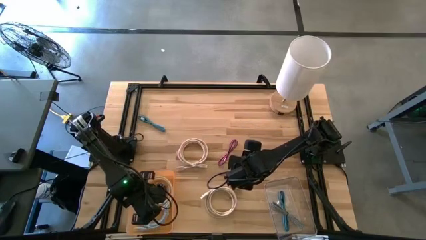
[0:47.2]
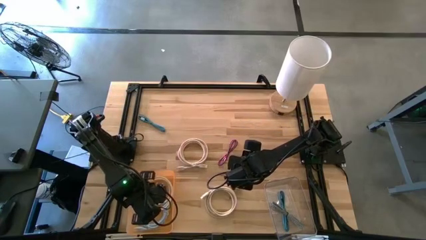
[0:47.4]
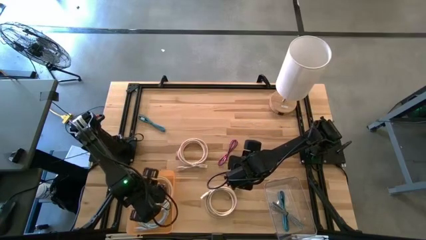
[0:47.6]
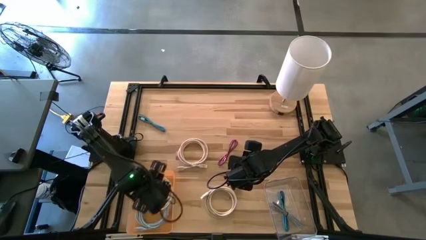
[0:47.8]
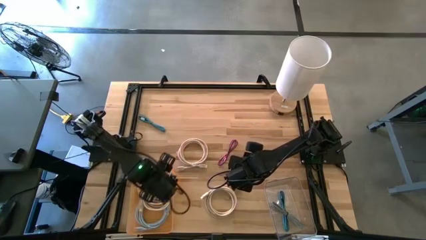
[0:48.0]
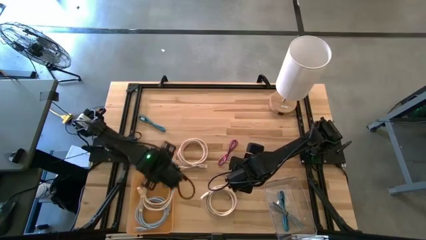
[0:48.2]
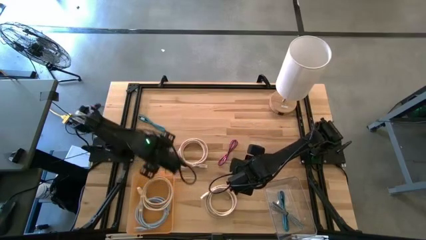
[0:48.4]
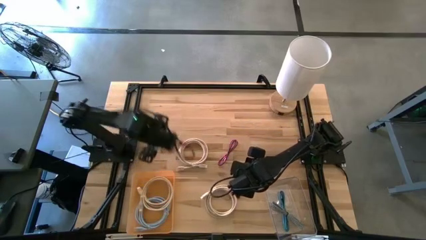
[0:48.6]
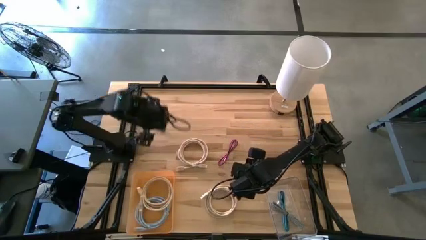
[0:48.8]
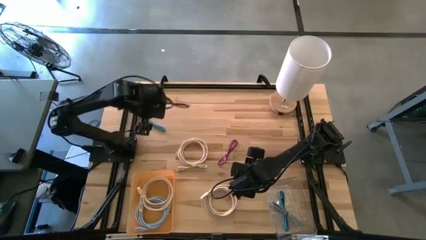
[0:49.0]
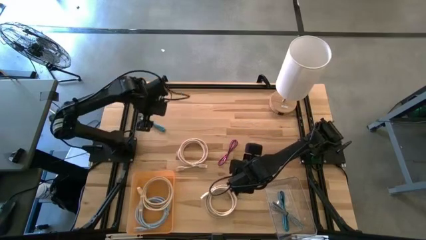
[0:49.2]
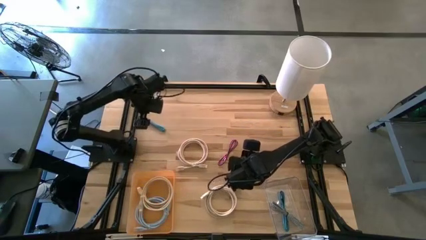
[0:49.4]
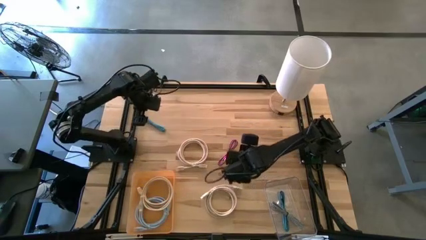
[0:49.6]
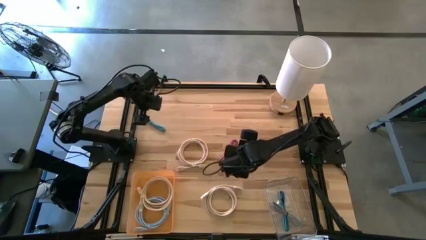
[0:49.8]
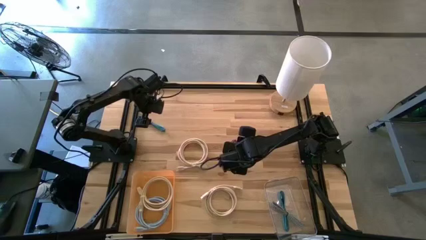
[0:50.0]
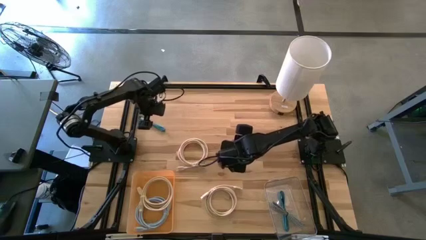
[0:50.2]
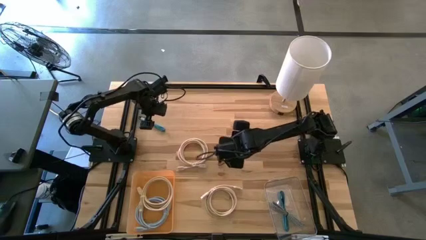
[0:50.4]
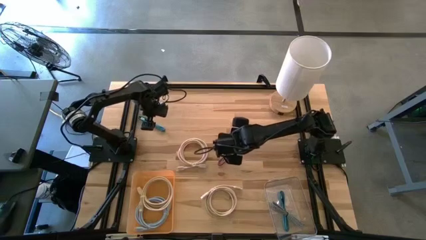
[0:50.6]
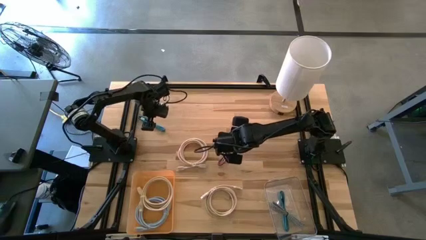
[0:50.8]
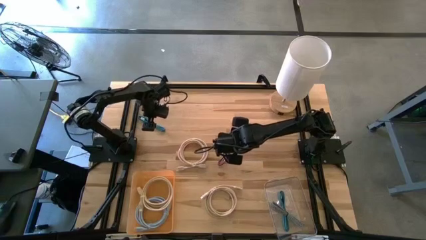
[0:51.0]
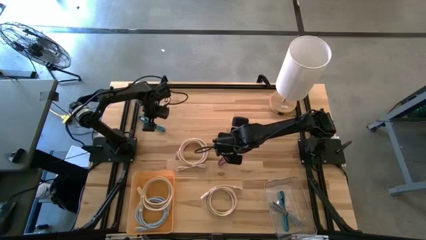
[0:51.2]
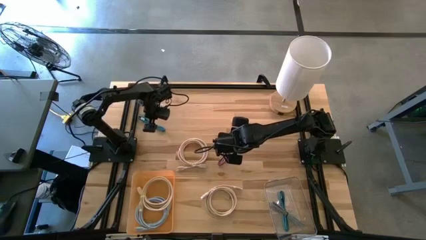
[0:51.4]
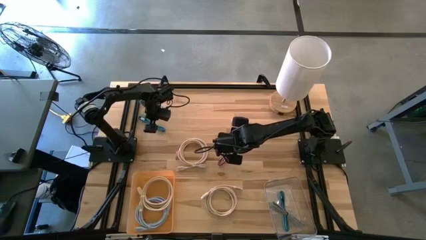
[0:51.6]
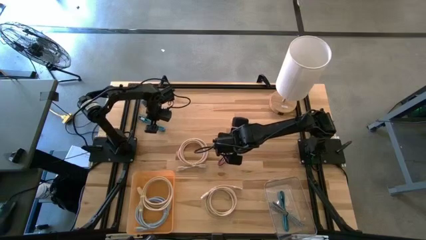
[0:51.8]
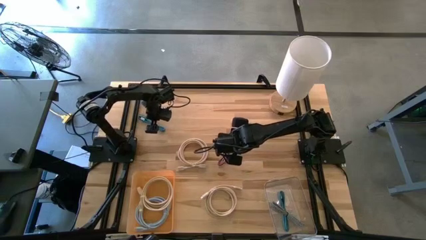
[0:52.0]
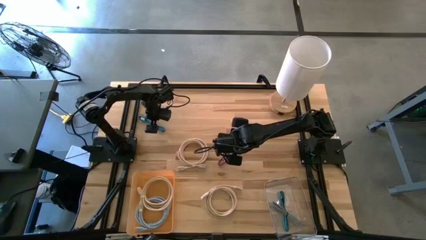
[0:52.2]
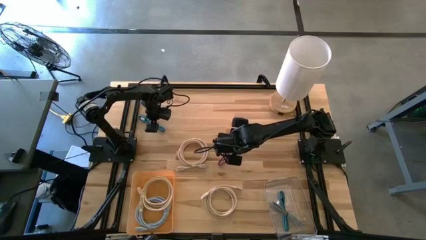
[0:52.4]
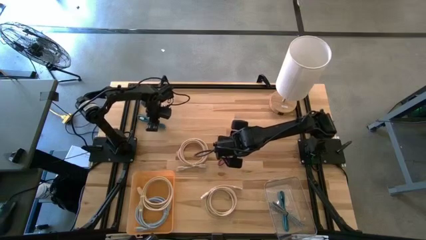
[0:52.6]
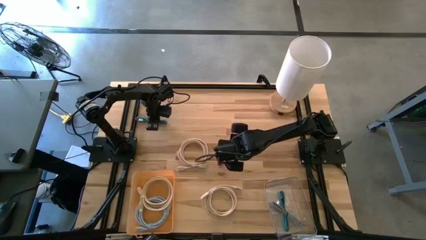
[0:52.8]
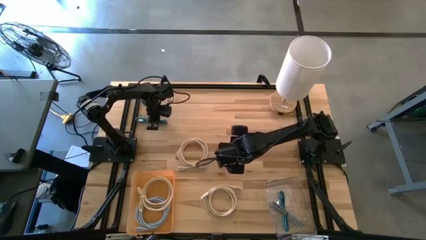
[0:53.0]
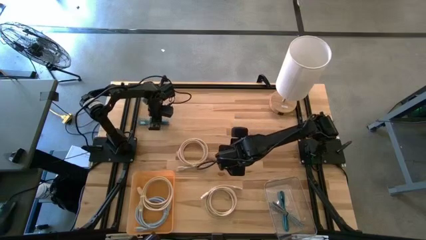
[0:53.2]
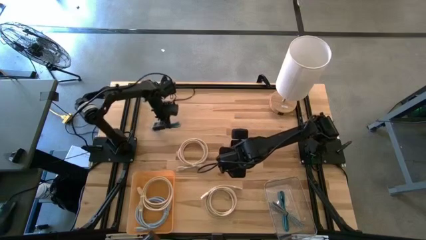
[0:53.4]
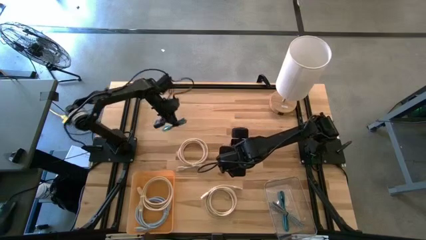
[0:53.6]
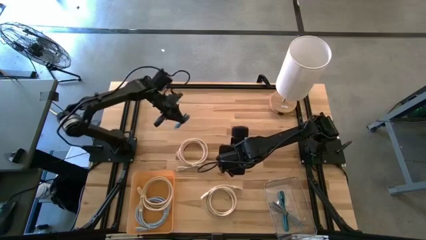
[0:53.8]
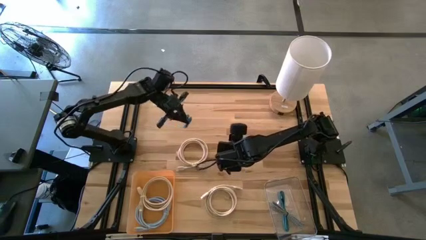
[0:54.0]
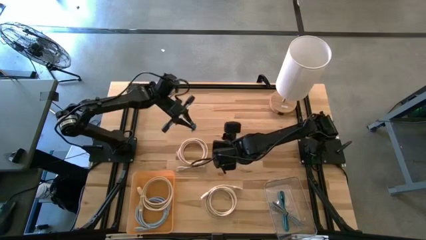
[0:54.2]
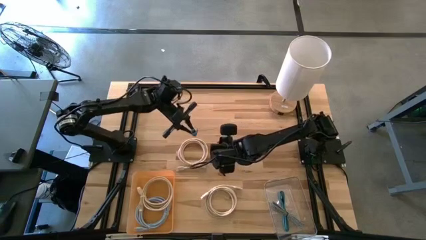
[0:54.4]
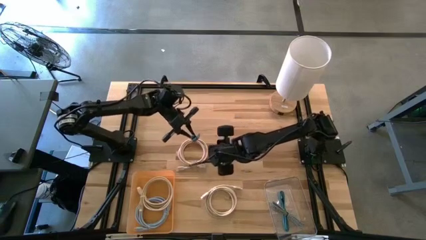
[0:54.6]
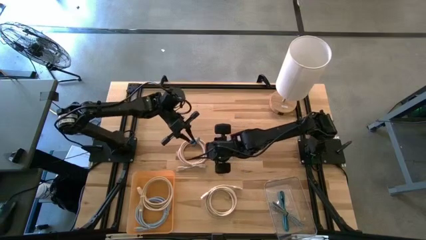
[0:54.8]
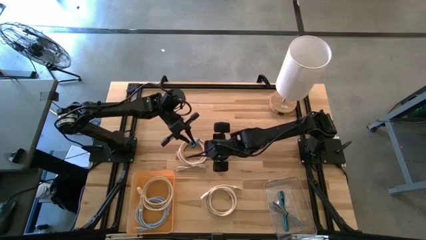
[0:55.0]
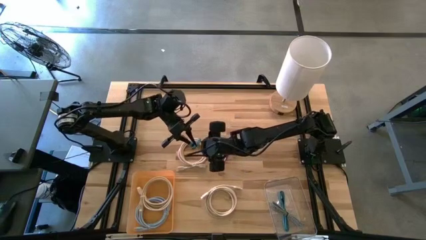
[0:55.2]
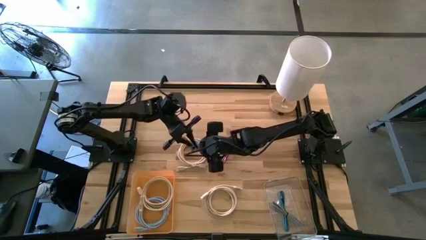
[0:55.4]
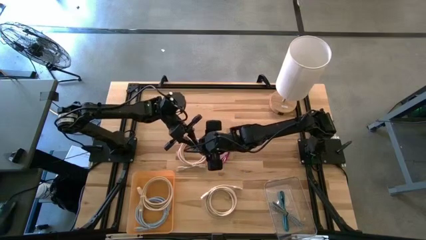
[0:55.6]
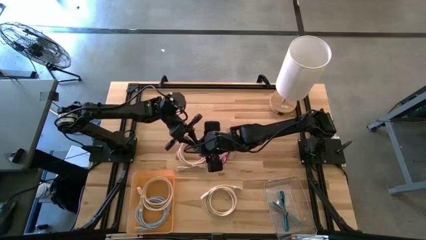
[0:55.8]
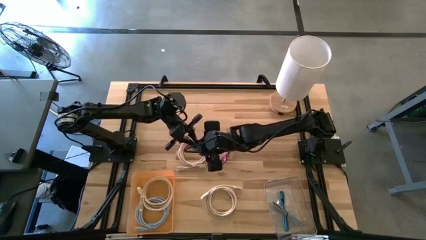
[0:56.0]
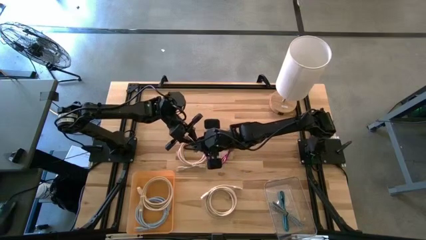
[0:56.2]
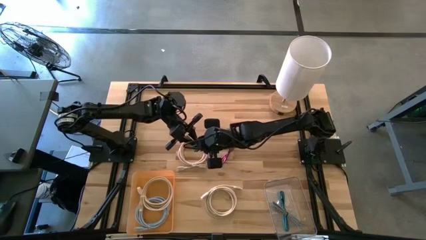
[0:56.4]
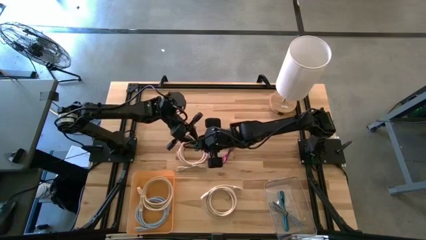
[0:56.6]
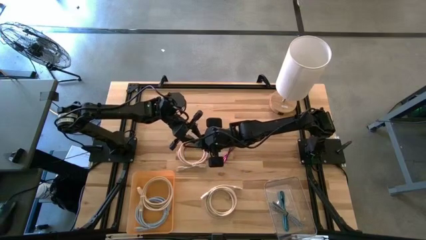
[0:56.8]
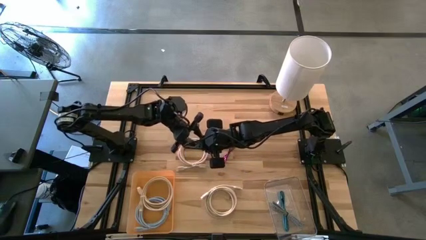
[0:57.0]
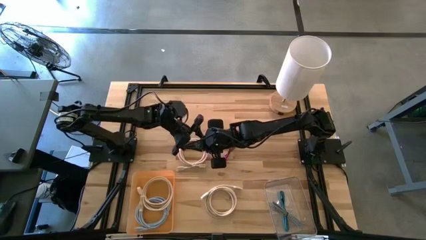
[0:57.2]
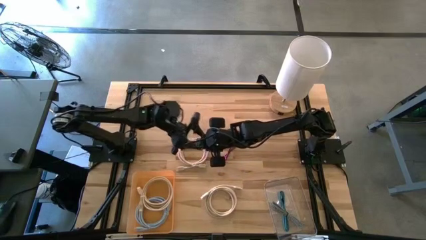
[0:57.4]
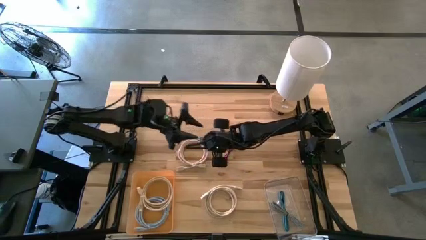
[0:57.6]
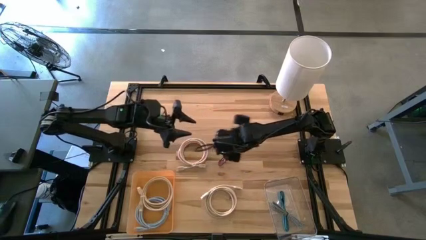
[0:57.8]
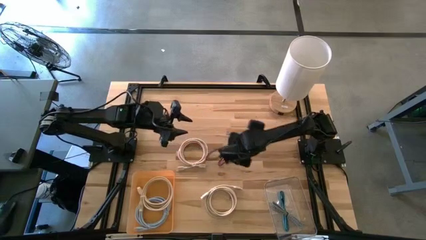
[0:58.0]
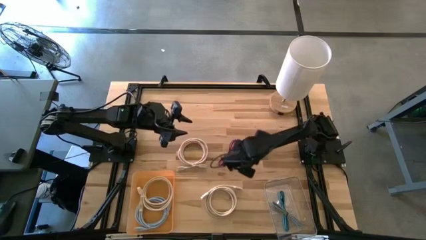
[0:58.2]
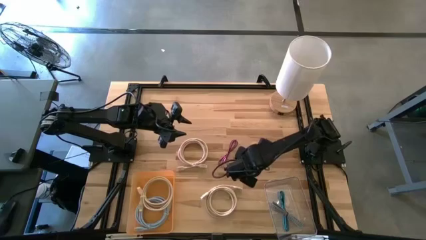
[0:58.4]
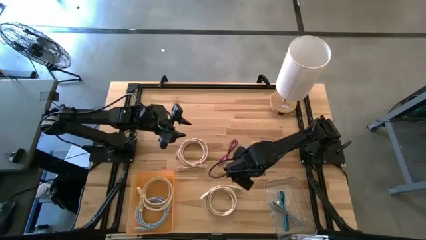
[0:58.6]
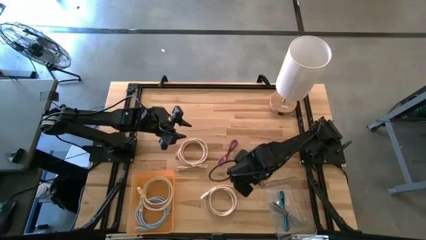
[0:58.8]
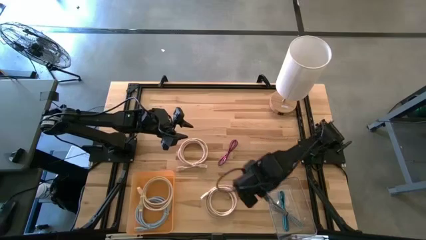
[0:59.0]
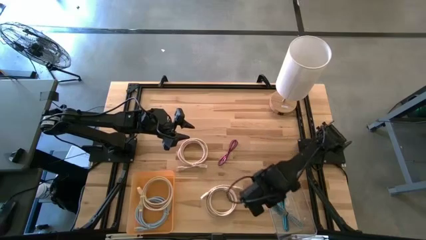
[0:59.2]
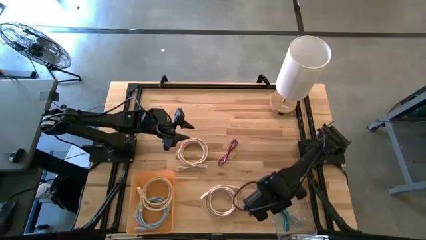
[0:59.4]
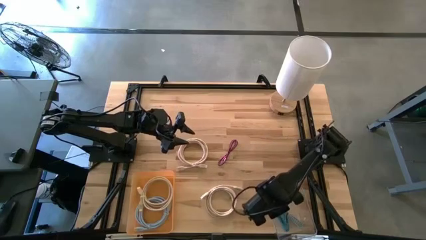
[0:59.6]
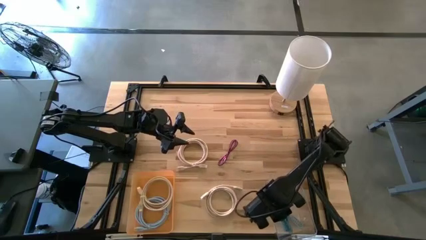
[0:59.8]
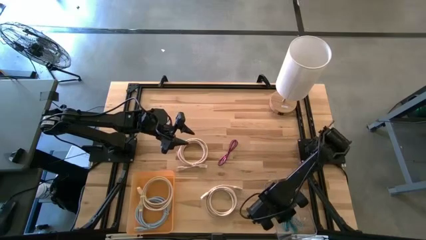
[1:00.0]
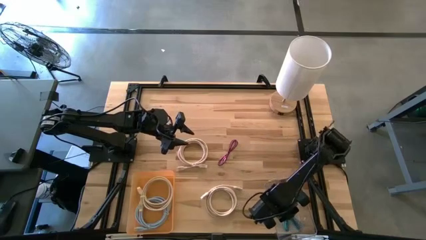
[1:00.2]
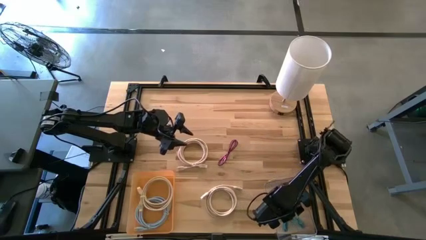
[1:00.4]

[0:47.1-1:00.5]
Task: Pick & Place USB Port
Put the blue USB cable into the transparent bin

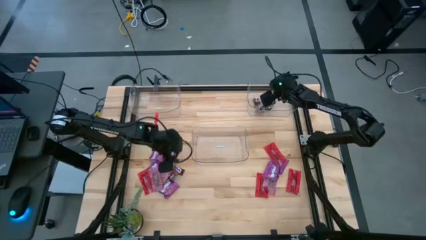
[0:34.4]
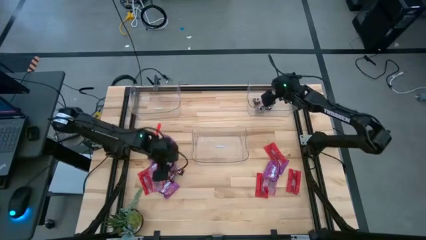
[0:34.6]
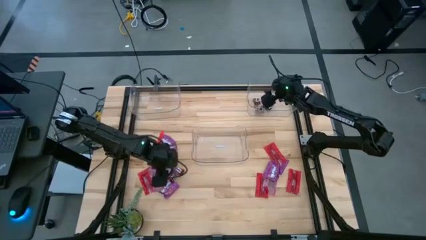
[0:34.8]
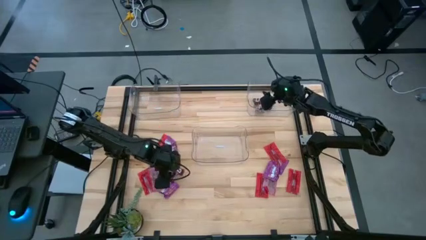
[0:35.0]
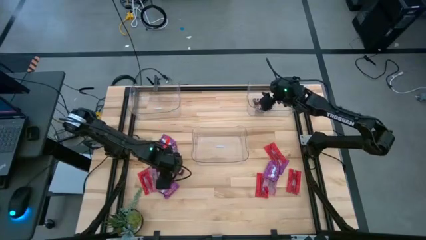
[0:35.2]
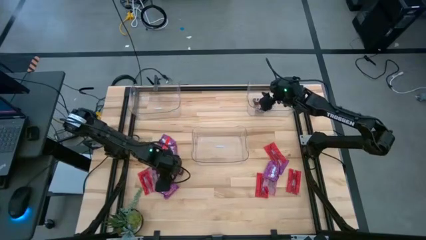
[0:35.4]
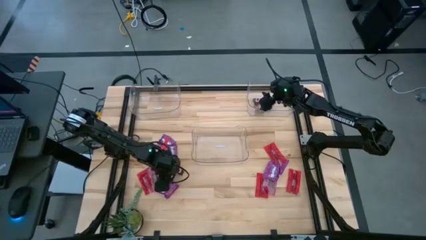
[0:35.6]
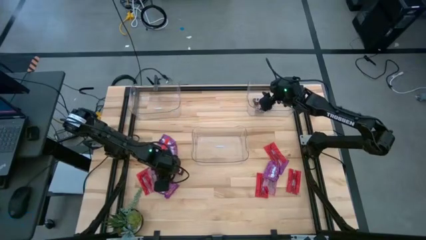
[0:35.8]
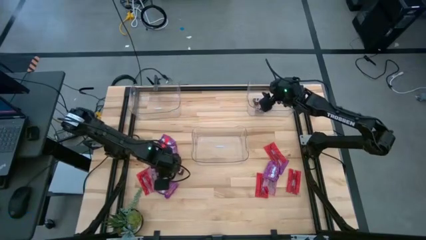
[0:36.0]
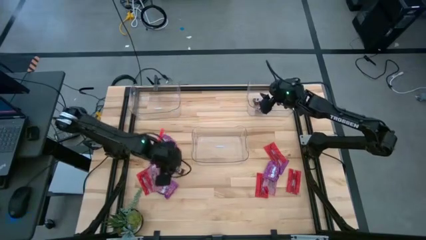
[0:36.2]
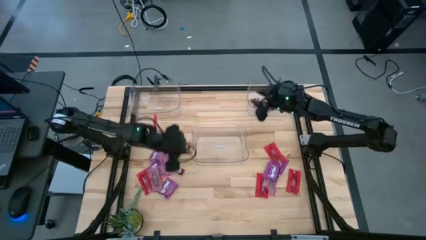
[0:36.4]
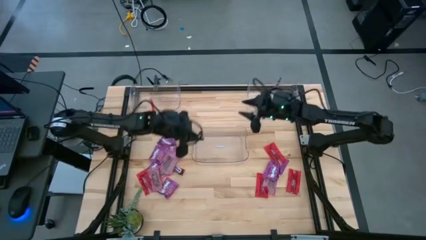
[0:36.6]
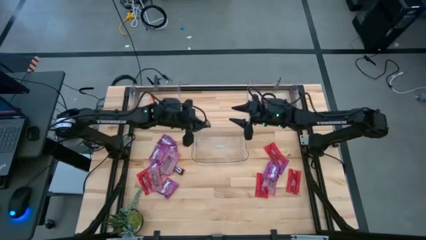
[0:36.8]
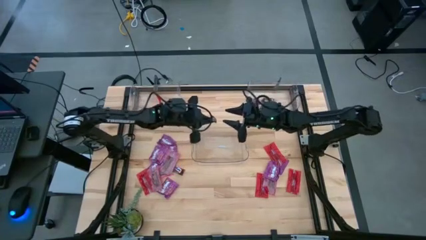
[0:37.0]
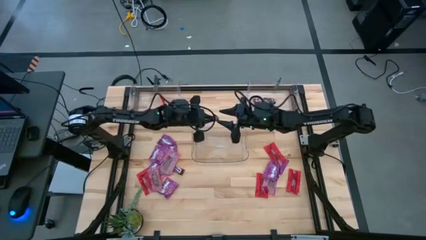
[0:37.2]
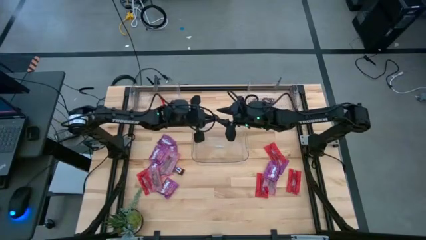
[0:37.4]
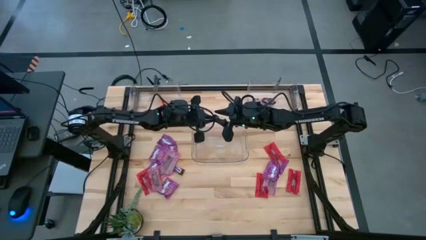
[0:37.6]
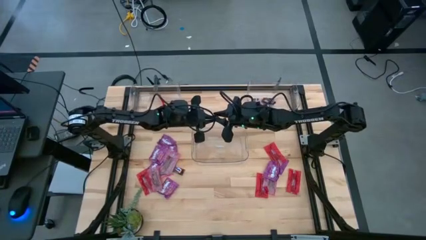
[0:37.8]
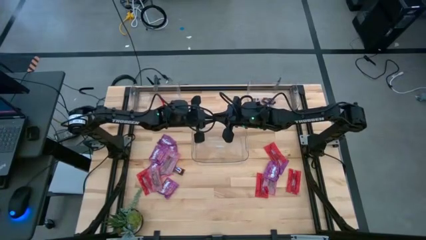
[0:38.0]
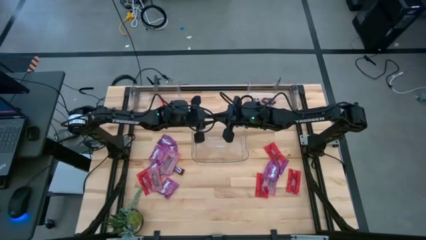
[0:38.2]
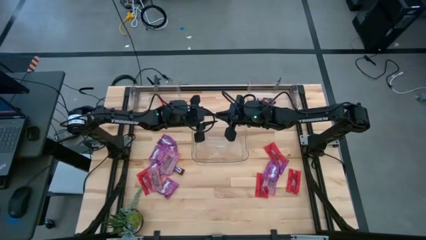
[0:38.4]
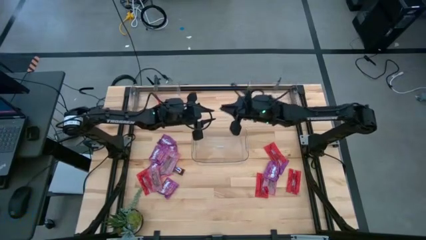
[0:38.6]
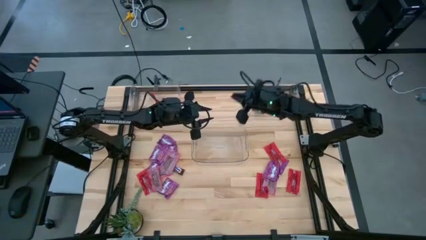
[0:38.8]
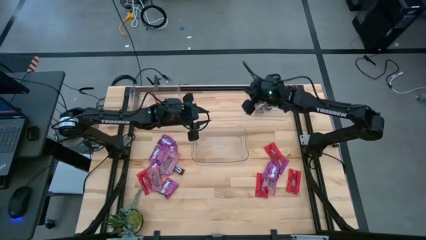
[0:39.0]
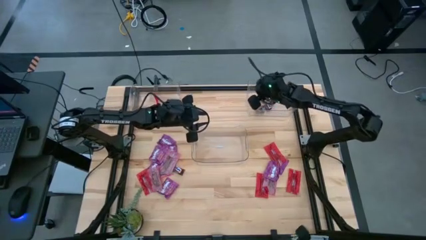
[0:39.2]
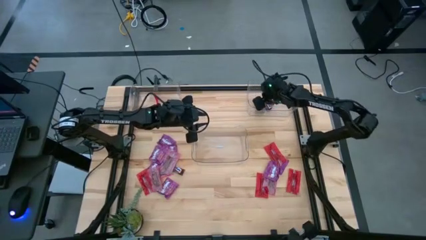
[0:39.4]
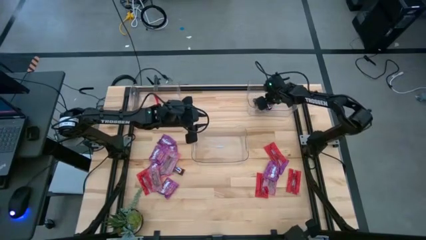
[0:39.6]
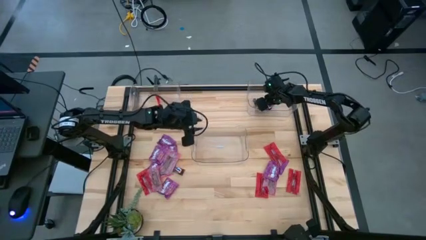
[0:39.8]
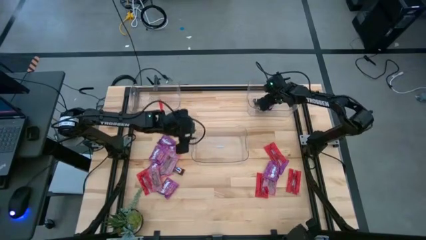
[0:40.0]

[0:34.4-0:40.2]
Task: Sort candy
Put the brown chocolate bar into the top right transparent bin
